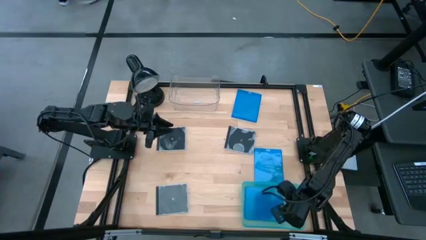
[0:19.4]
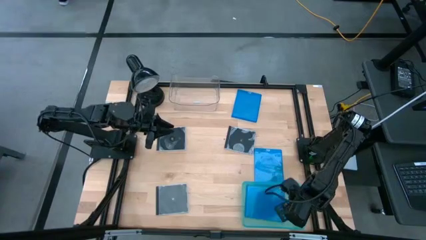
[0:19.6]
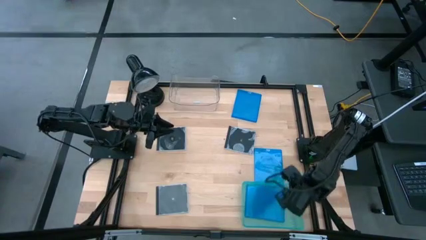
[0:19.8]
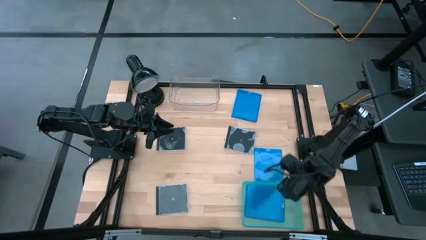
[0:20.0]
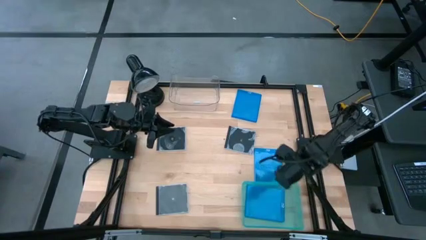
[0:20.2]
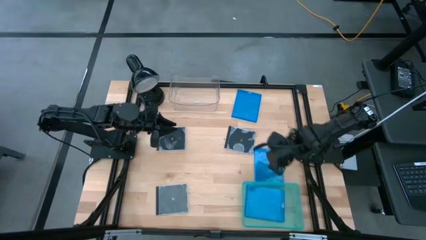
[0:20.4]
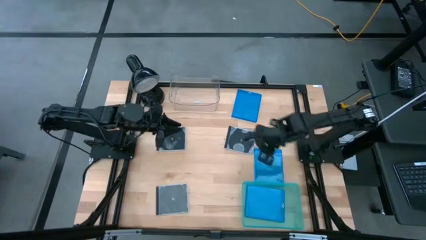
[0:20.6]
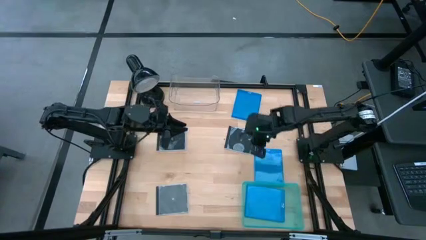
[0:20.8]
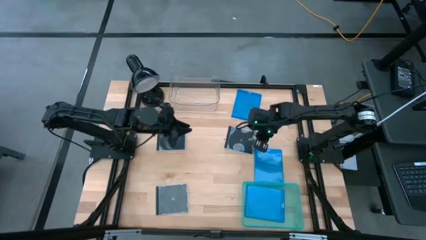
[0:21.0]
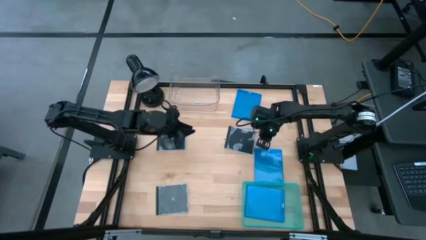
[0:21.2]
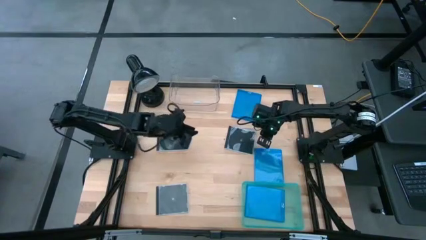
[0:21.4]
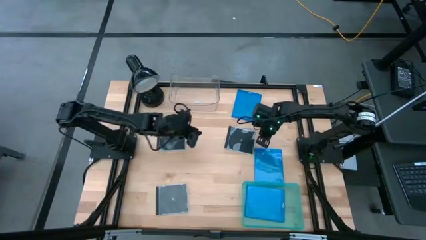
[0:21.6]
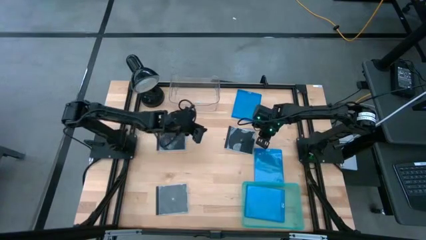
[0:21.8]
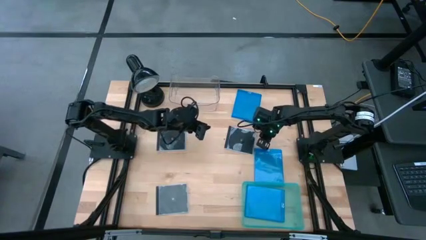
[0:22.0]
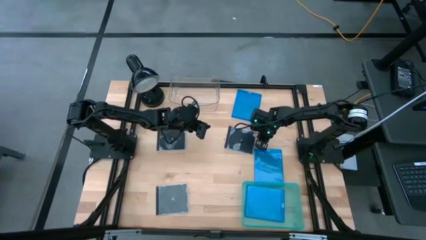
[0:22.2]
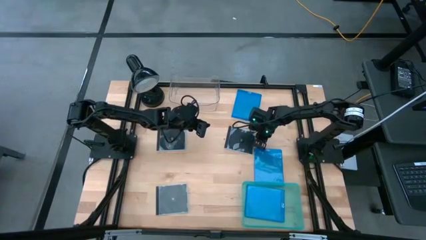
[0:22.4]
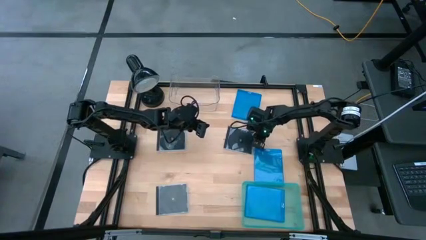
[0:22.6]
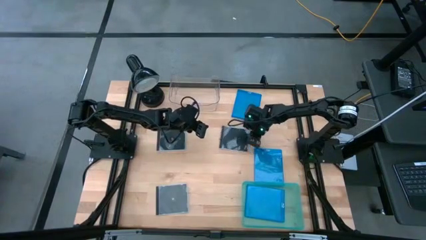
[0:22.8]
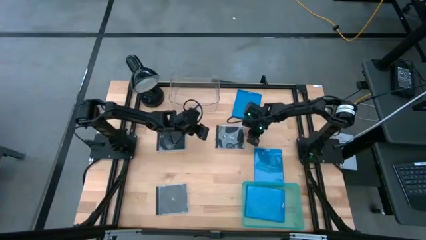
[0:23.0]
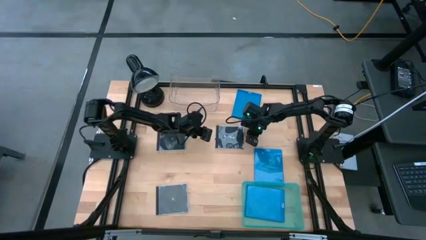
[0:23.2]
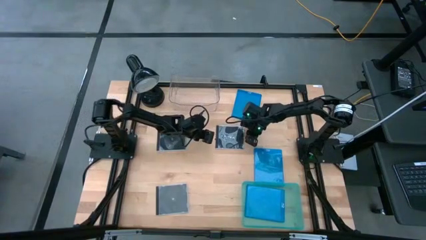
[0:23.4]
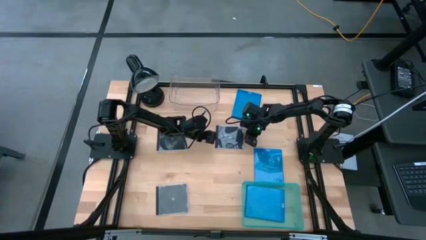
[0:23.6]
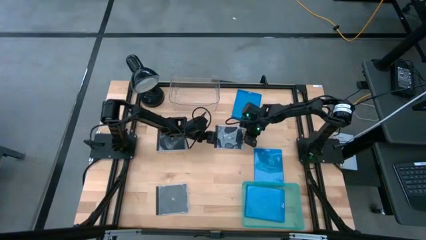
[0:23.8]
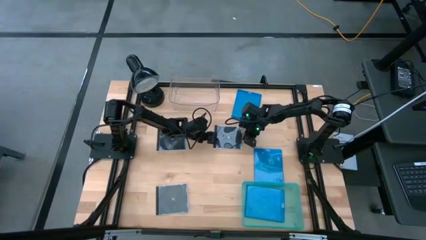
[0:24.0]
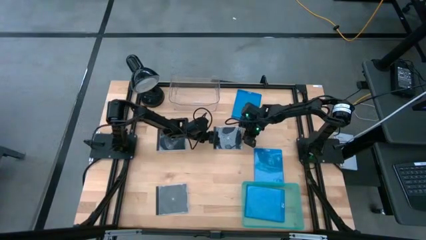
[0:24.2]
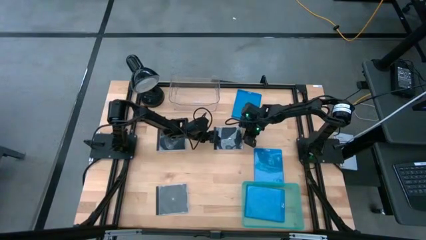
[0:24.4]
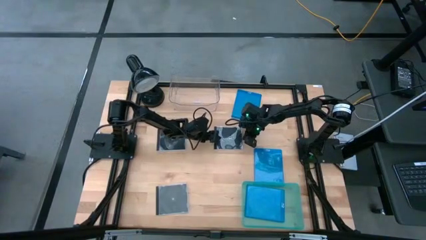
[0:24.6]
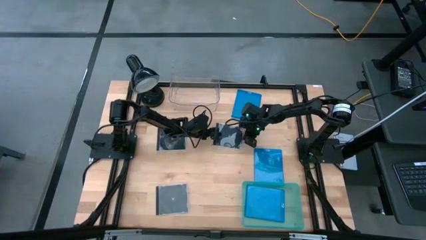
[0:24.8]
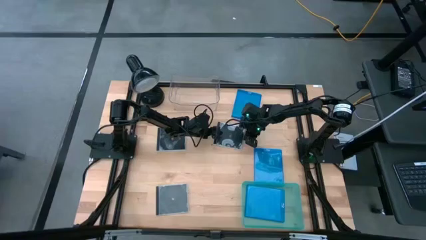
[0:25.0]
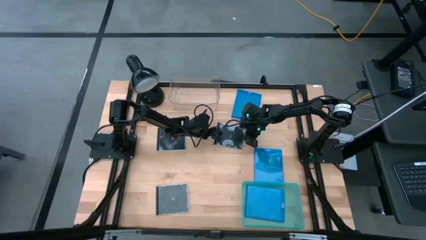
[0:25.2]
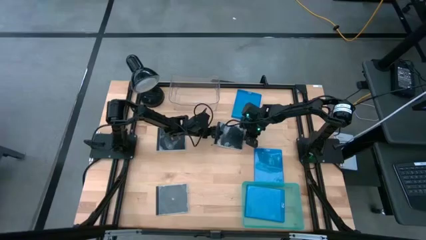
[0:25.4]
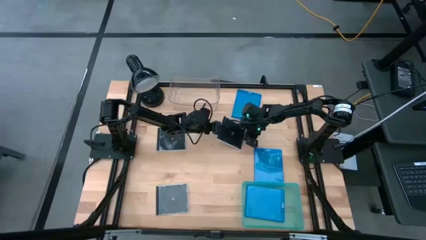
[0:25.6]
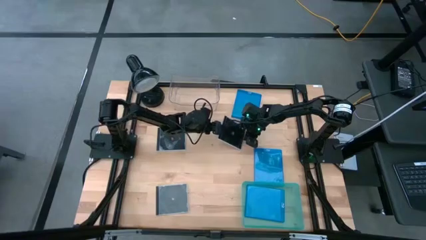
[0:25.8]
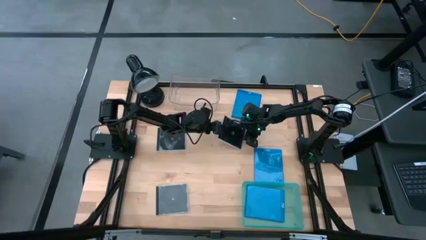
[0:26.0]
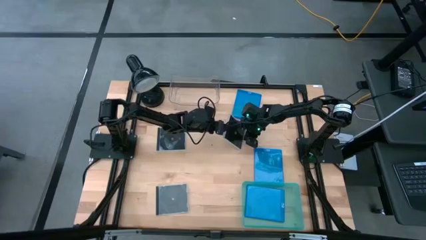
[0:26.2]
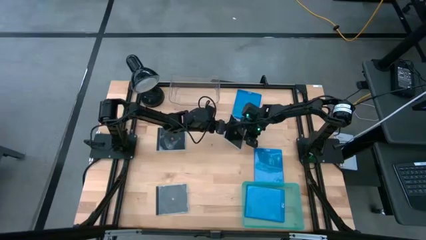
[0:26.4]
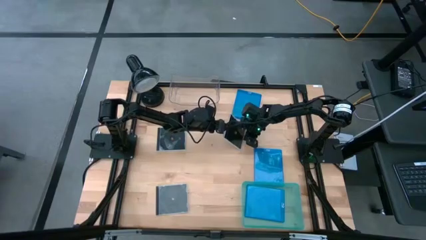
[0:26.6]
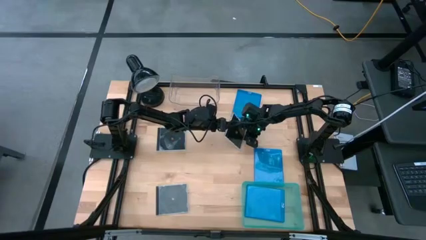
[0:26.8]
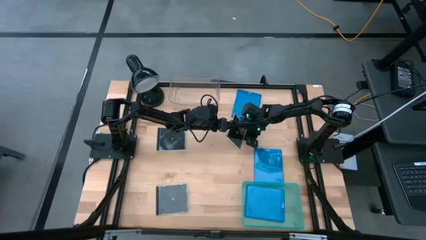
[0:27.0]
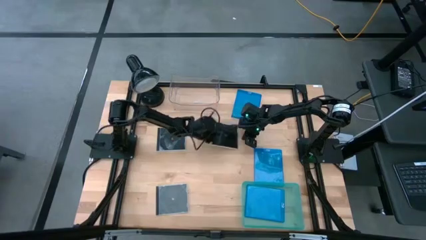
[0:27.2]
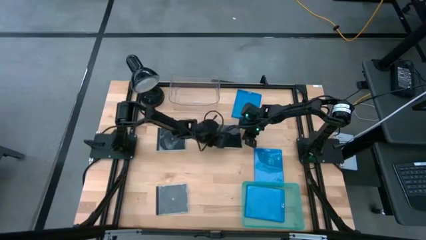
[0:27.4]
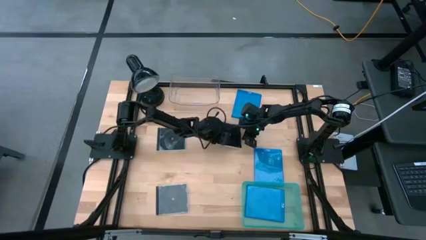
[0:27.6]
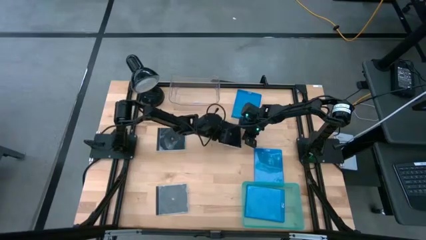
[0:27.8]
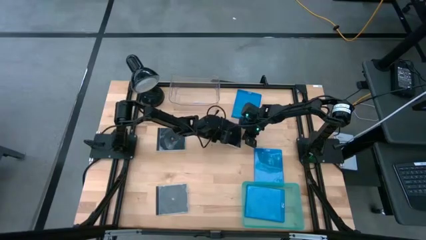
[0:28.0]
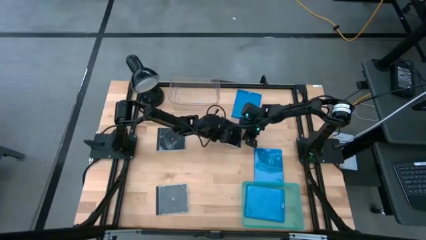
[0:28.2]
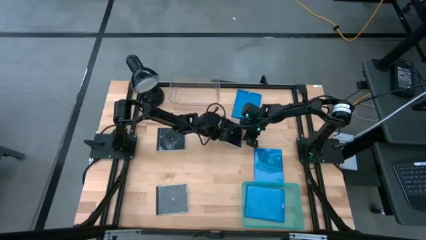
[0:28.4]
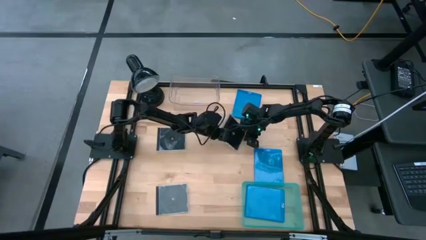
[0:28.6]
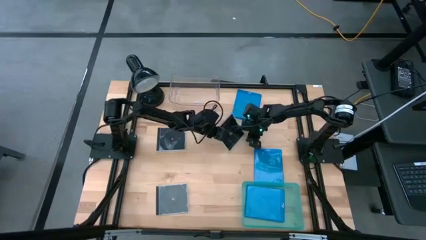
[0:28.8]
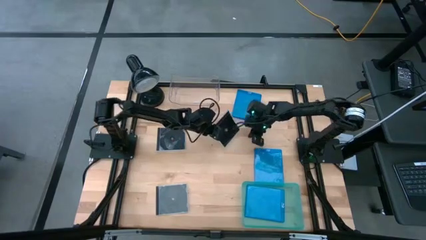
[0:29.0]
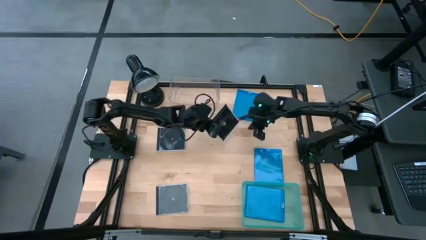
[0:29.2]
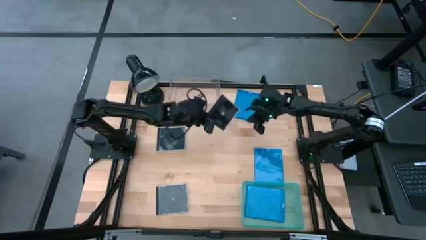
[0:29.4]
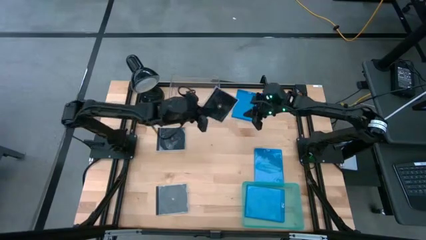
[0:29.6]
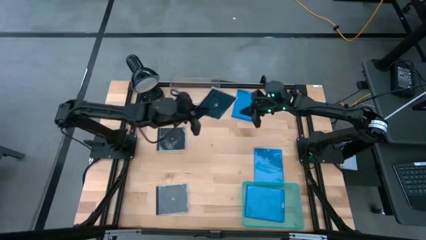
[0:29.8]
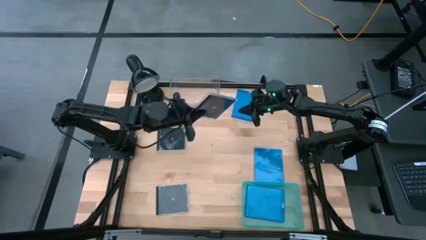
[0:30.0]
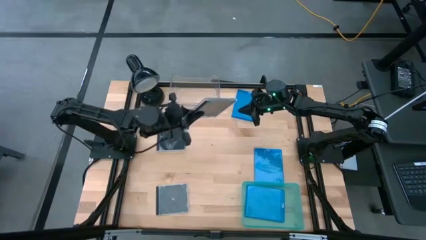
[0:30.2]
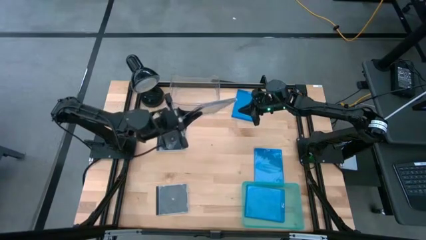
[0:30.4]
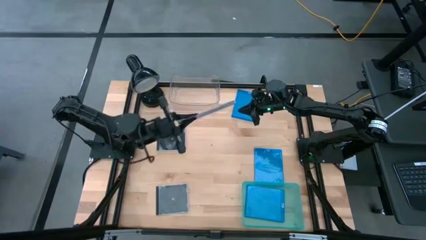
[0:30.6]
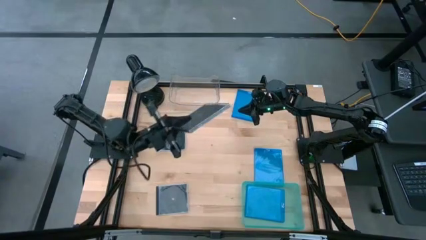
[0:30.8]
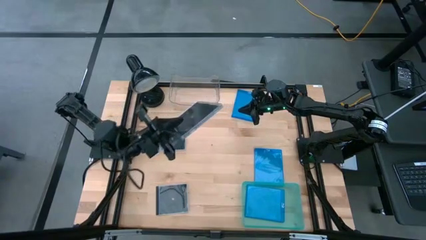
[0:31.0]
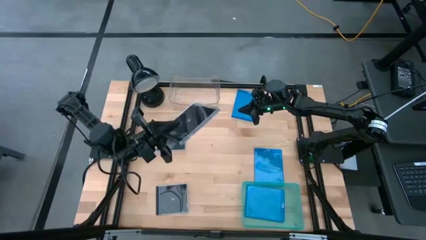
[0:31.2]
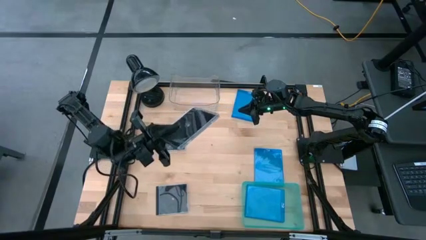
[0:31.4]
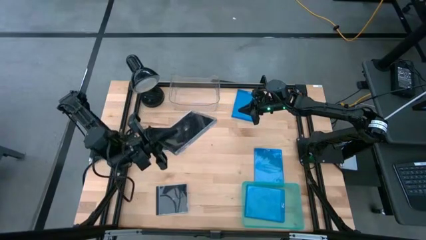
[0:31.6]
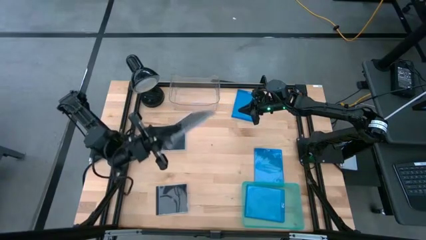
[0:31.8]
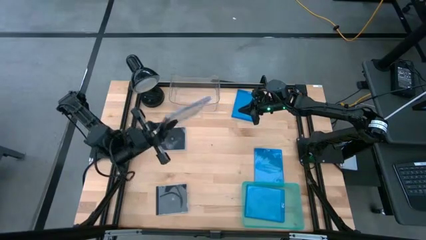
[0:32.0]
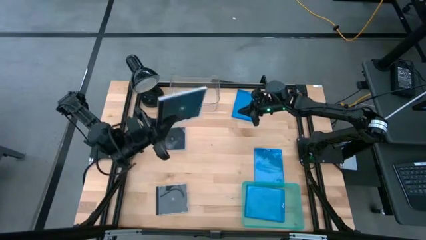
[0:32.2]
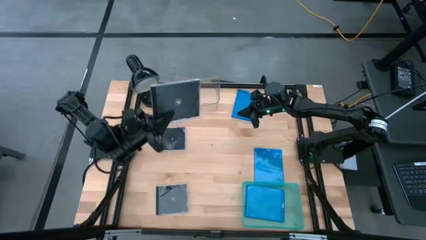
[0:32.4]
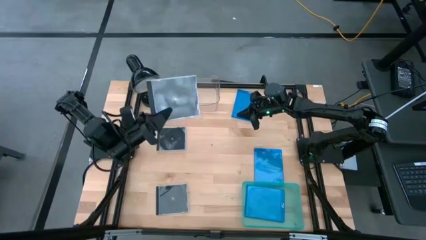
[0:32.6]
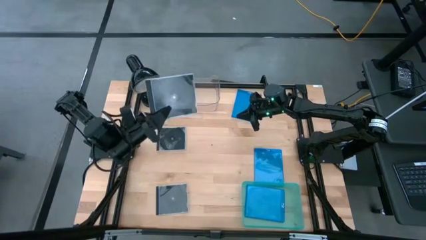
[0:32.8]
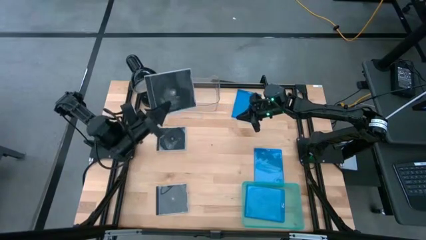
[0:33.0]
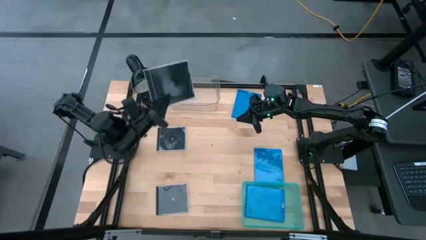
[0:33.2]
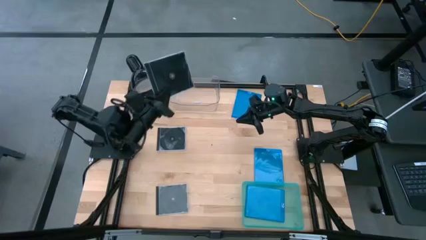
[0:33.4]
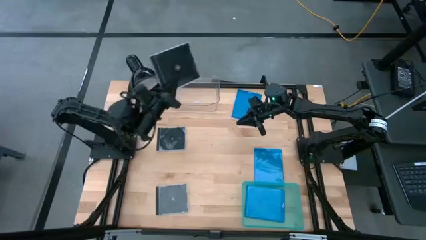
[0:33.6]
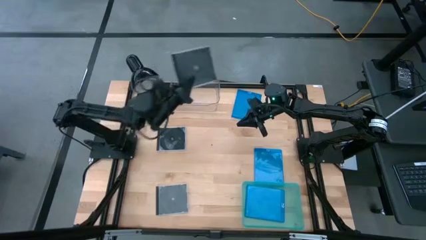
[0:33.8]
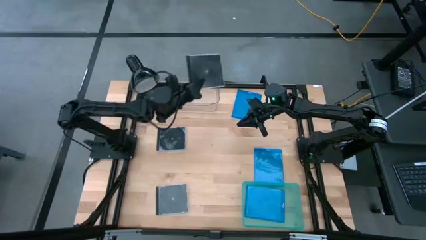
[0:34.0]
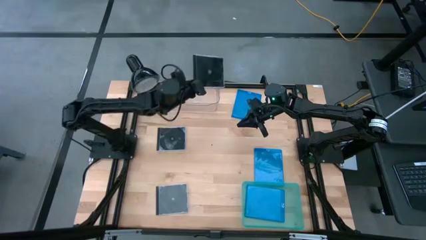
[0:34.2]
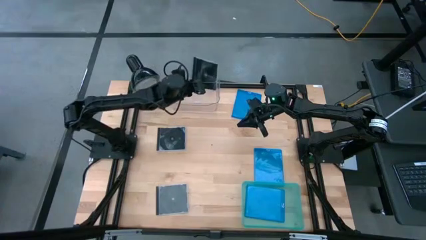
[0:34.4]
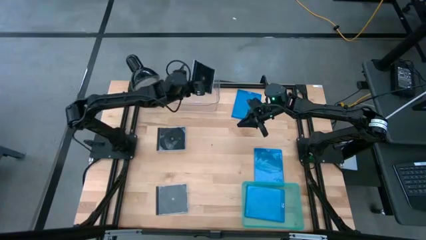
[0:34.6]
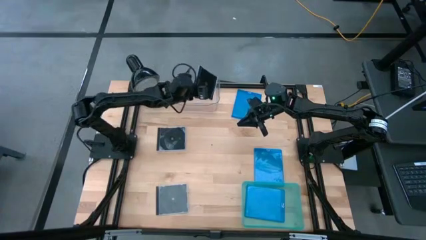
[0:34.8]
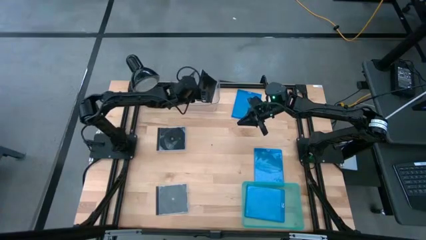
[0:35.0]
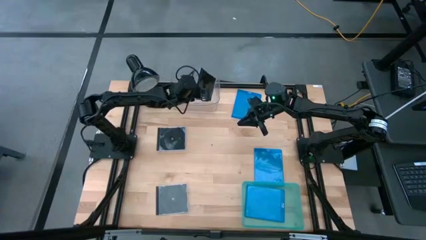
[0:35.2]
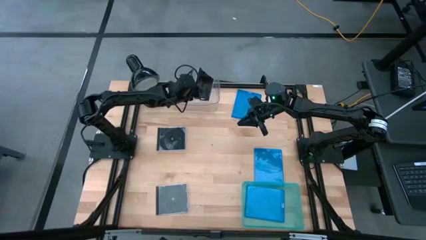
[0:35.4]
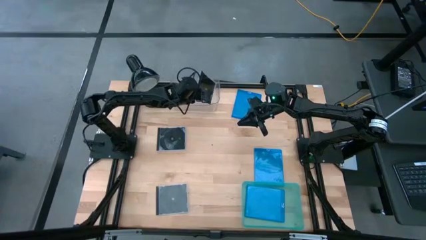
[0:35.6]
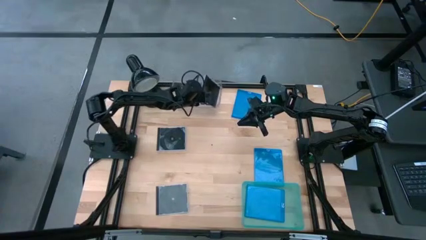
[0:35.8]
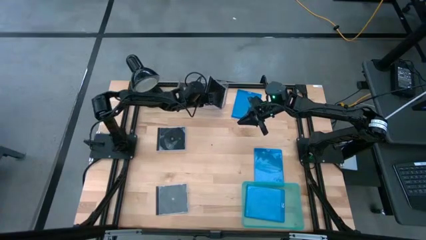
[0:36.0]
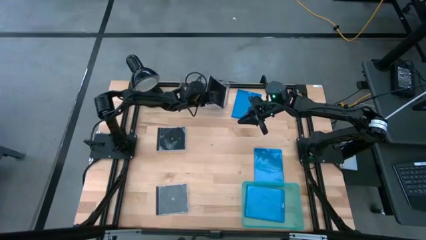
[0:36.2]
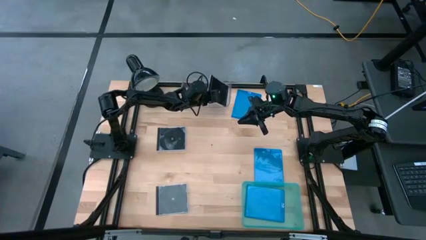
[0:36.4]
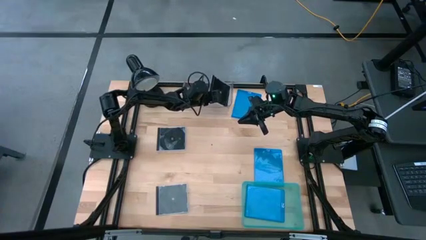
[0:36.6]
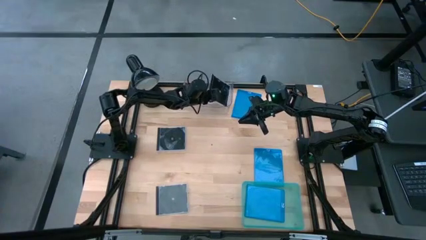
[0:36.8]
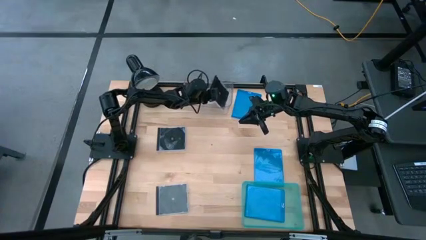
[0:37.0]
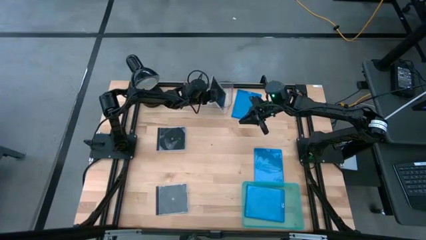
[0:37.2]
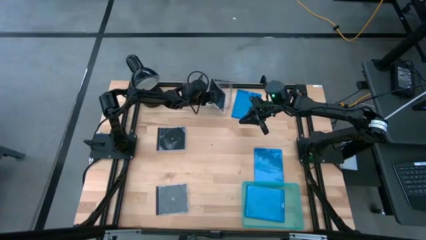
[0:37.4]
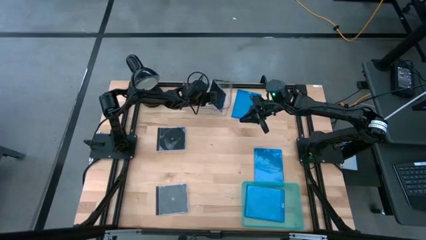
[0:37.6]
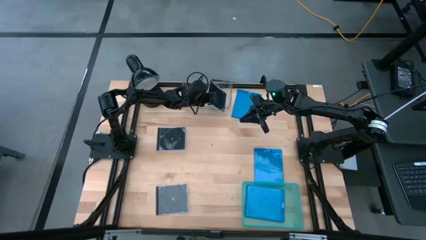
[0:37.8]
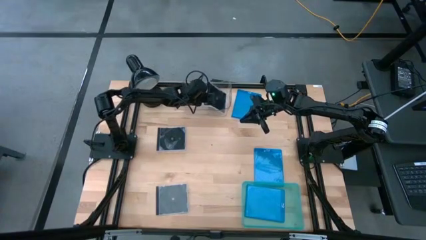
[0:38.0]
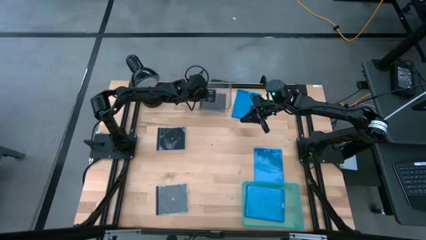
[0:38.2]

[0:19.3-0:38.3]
Task: Pick & place jewel cases by type
Put the top right black cd case into the transparent bin
